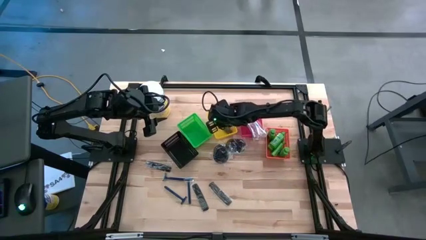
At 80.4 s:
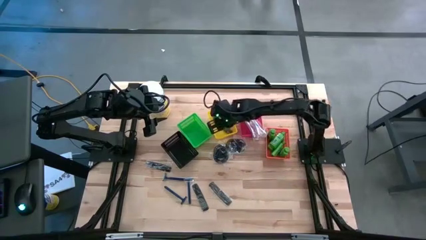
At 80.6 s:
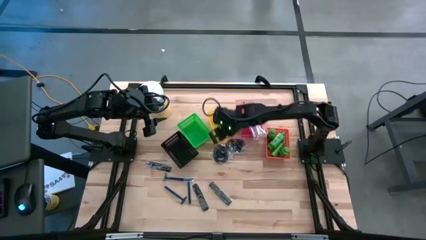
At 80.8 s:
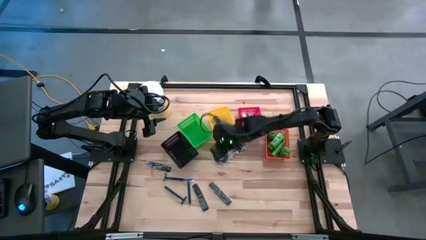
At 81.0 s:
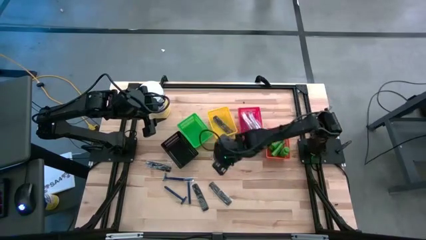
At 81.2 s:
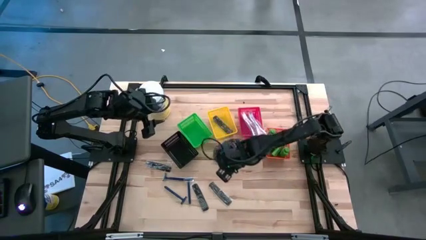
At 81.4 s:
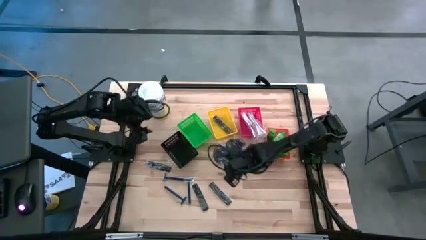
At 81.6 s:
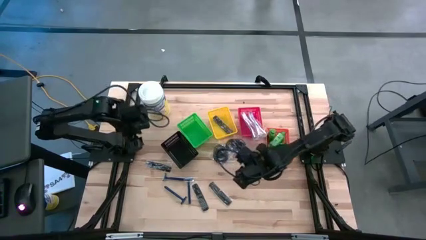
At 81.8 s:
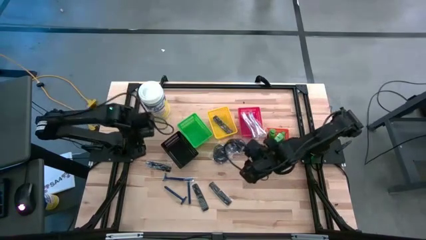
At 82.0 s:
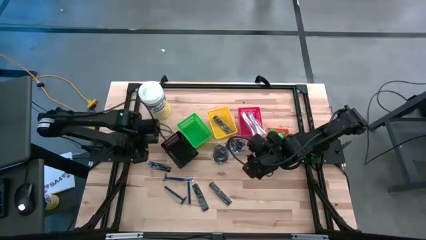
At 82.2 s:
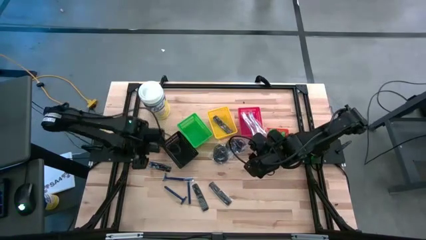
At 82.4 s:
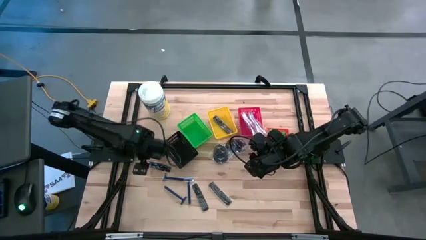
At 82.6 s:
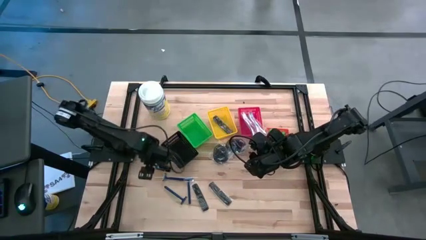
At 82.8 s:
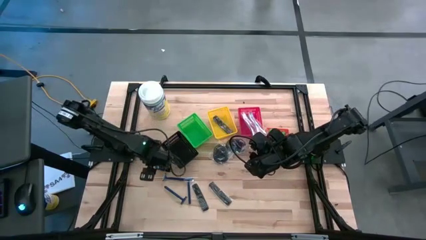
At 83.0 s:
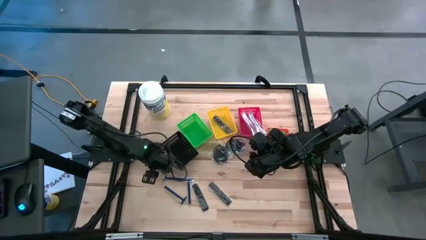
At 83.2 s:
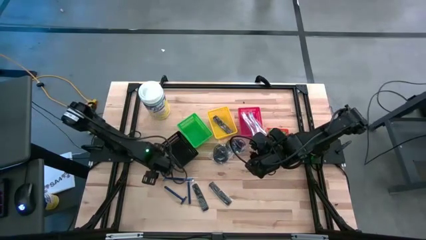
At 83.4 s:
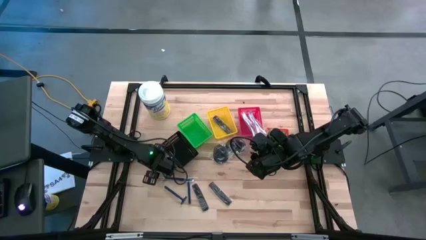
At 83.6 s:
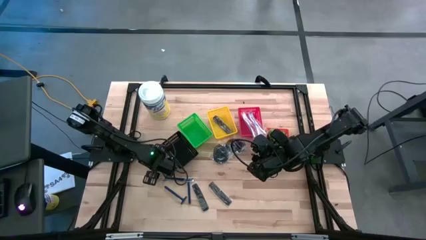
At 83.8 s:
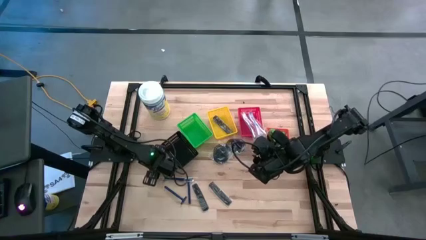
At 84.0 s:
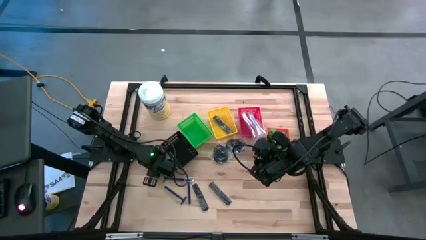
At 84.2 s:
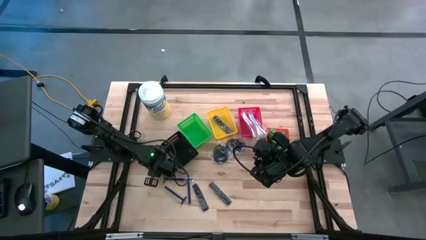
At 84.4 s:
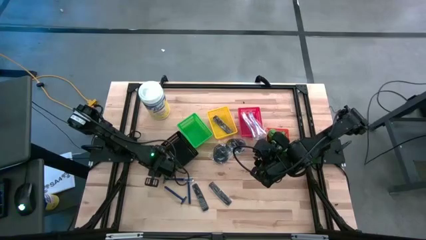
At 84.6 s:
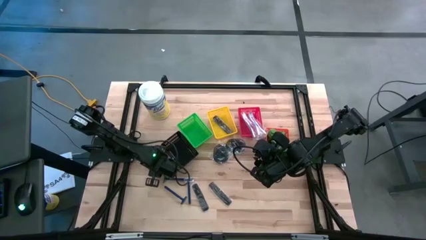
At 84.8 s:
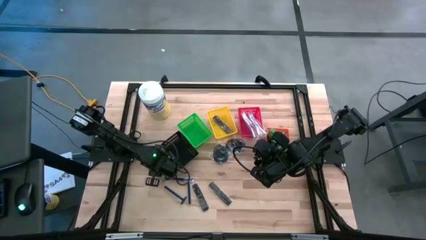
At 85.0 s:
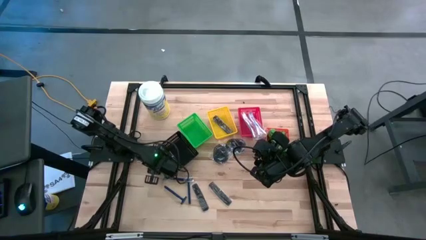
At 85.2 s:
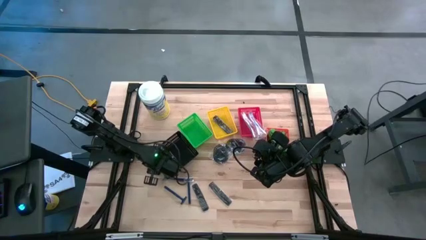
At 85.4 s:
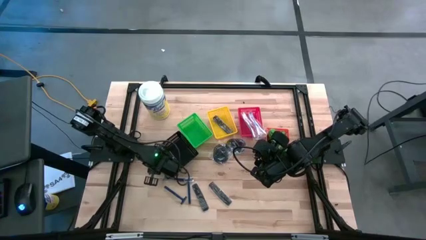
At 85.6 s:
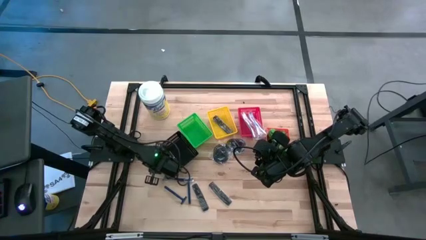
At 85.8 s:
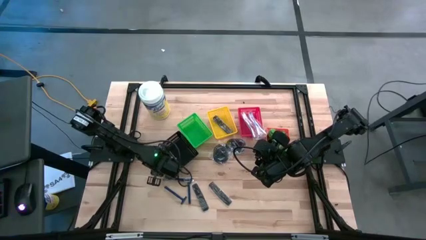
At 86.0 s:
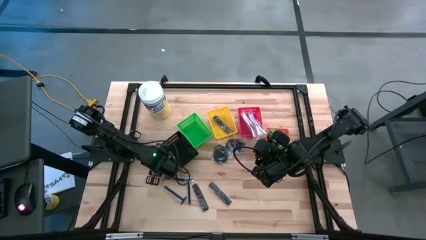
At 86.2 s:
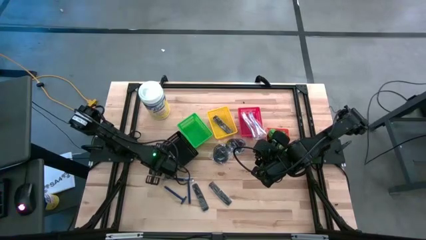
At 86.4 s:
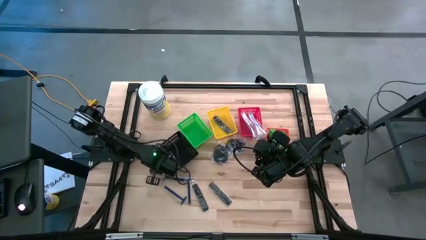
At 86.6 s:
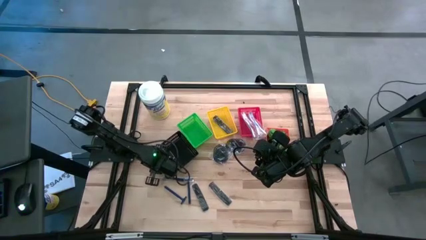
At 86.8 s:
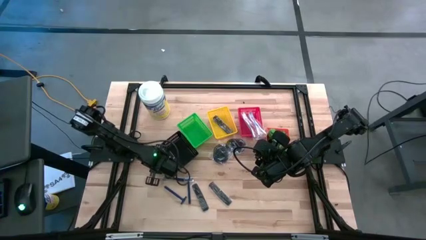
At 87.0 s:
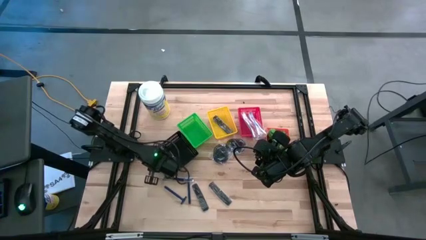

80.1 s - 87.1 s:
Task: Pick & Place Travel size toiletries
Put the black hair comb into the yellow bin

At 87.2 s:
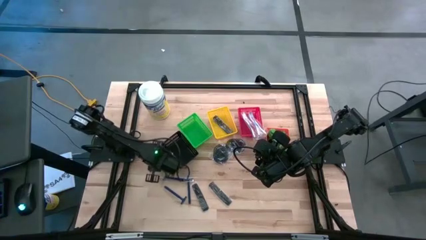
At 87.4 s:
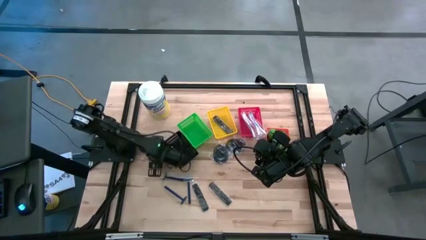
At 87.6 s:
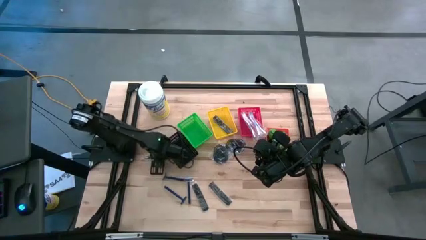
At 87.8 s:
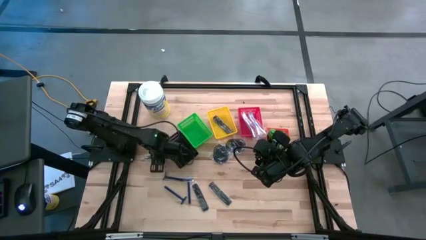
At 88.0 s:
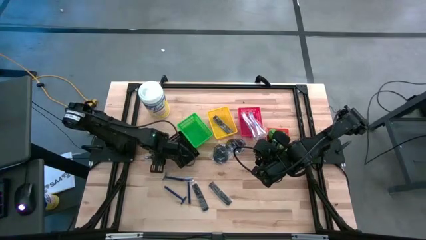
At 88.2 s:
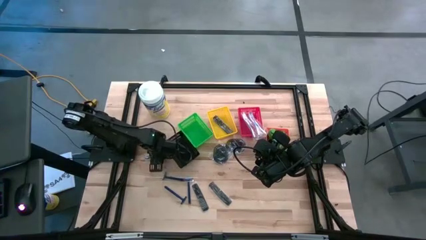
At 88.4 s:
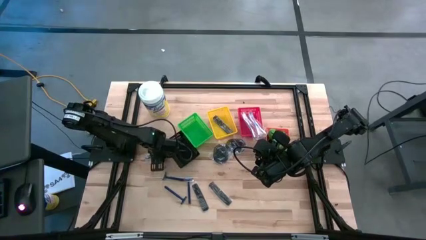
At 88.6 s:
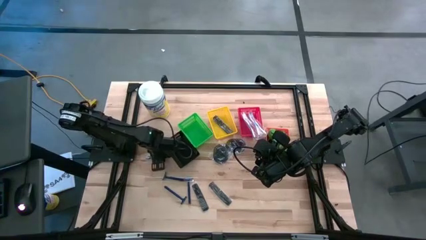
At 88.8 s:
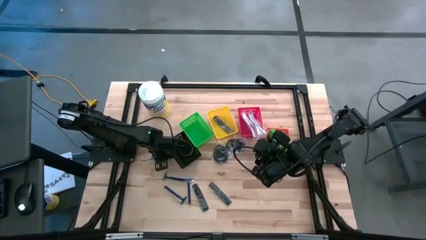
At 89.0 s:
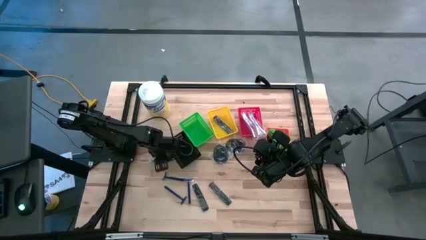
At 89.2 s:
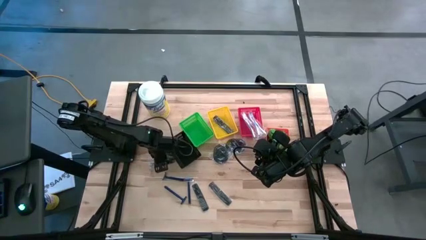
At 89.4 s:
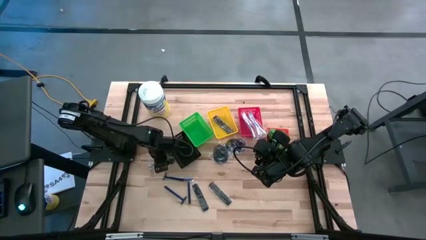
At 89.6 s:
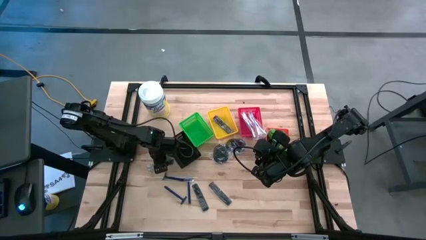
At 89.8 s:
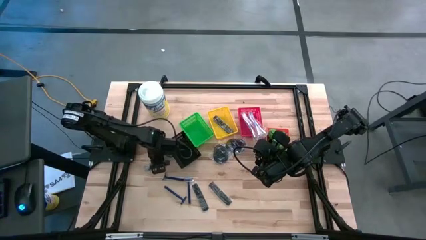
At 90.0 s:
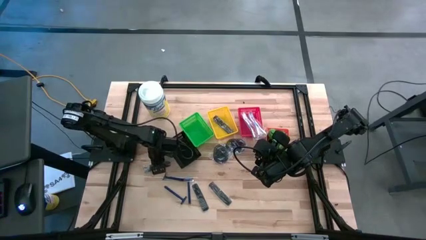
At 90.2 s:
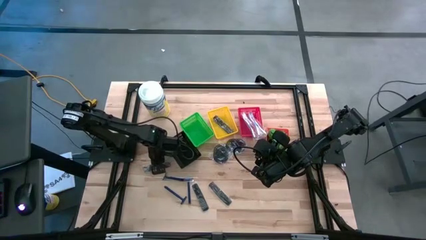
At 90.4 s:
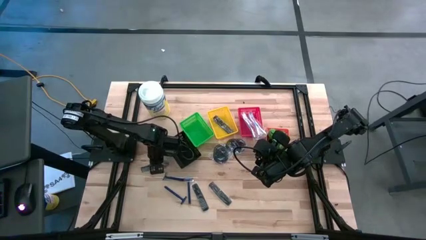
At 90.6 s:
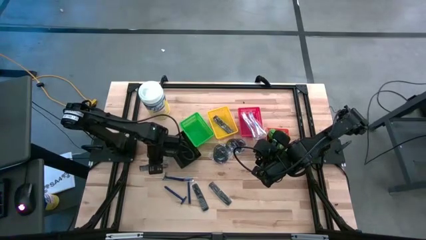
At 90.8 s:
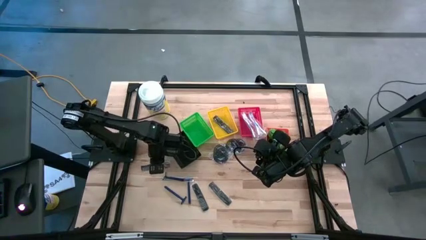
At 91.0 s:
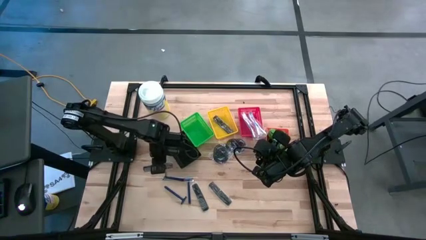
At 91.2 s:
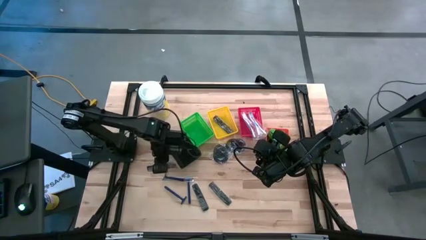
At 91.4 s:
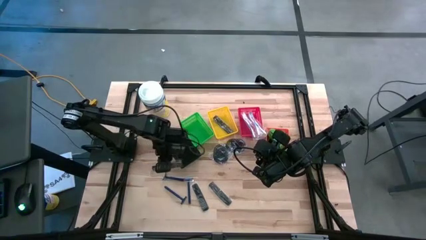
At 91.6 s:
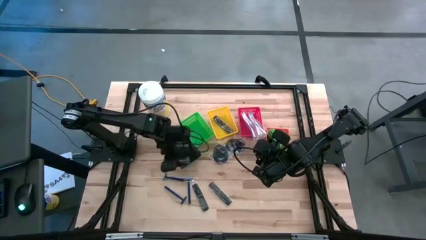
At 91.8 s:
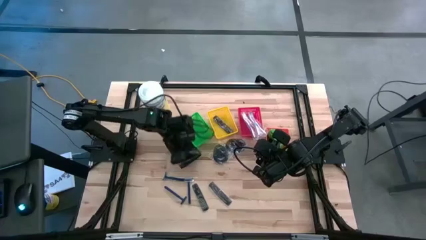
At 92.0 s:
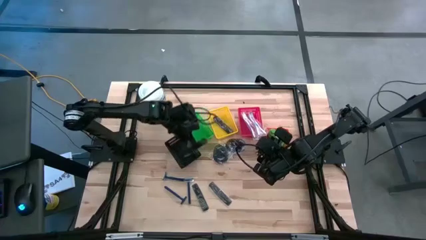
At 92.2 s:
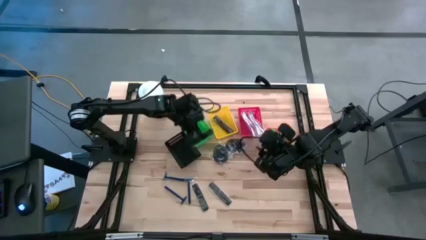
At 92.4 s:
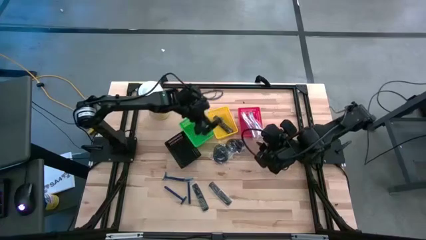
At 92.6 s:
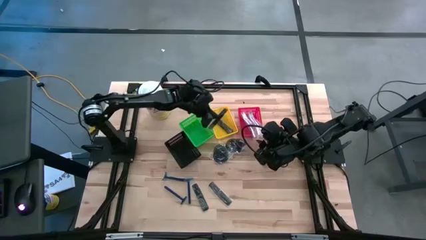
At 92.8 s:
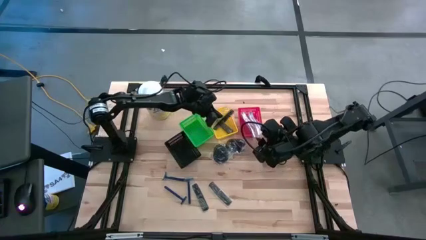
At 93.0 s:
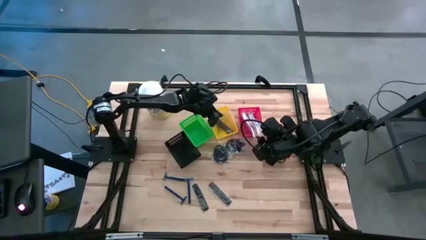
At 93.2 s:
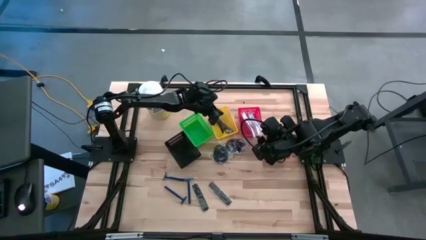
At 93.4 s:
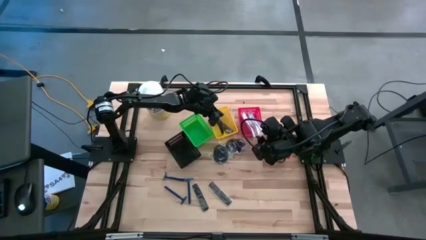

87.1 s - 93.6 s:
Put the black hair comb into the yellow bin

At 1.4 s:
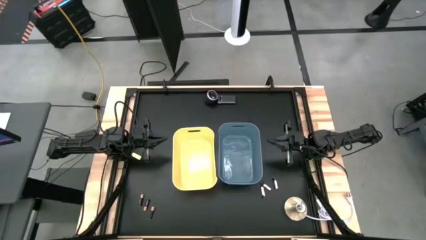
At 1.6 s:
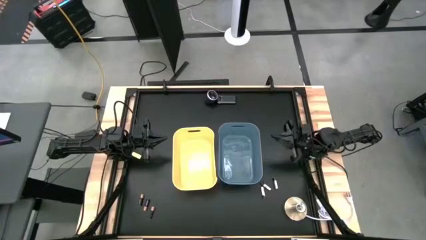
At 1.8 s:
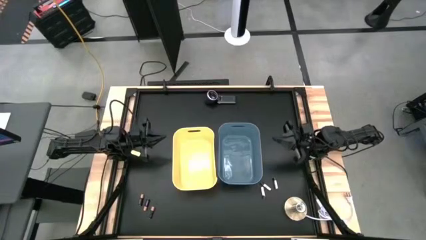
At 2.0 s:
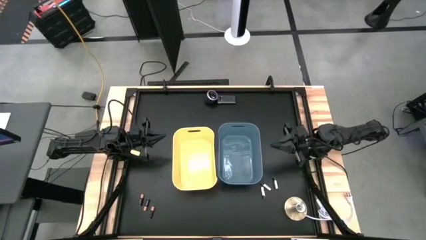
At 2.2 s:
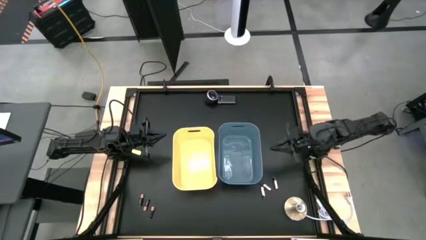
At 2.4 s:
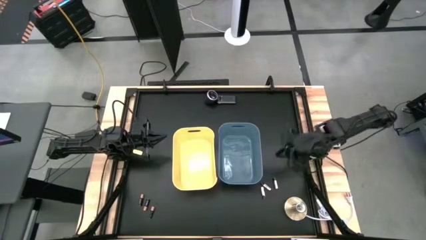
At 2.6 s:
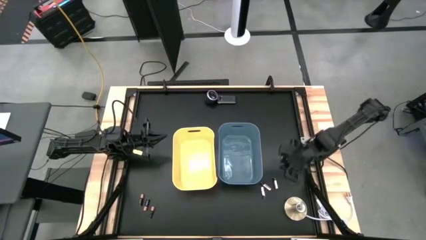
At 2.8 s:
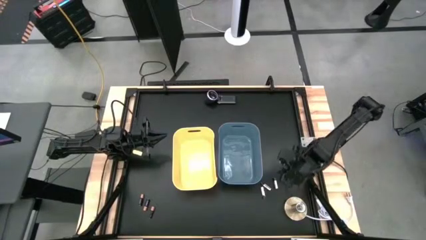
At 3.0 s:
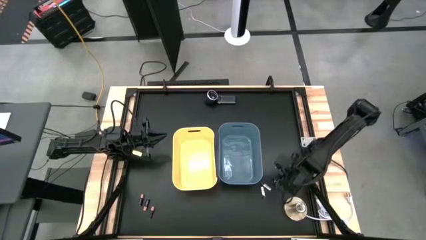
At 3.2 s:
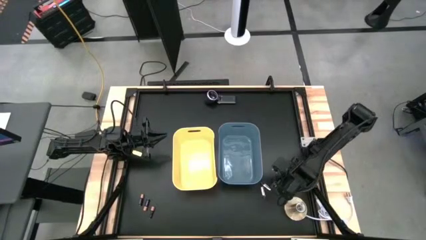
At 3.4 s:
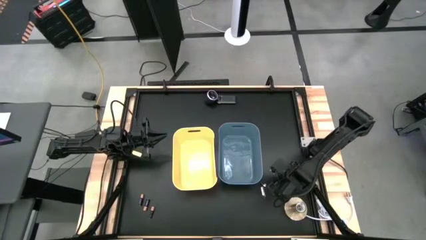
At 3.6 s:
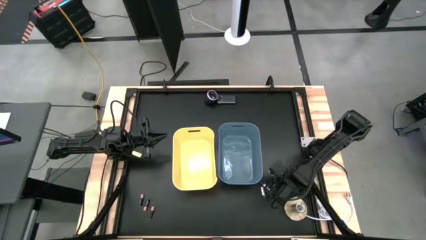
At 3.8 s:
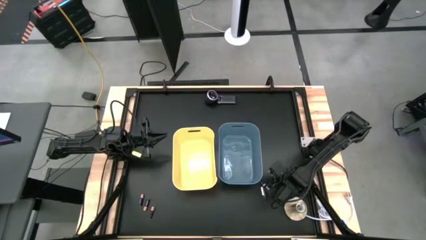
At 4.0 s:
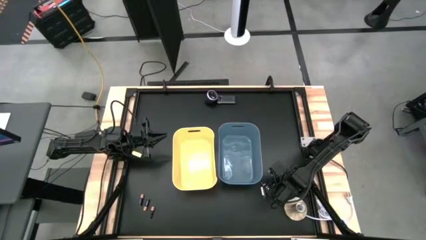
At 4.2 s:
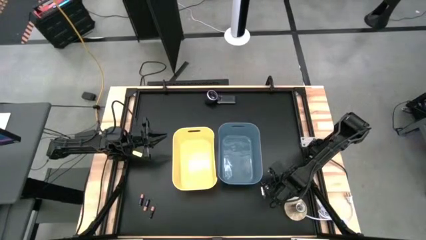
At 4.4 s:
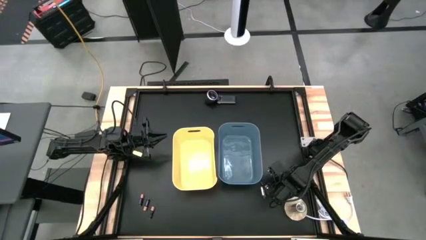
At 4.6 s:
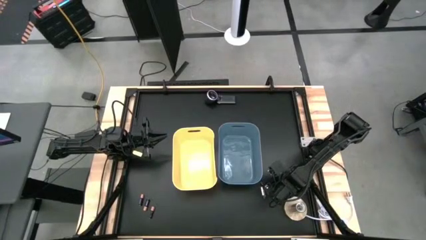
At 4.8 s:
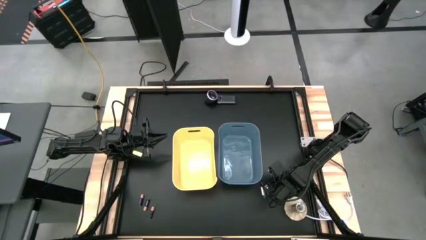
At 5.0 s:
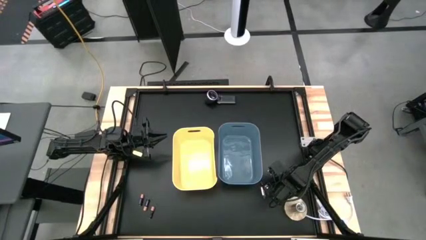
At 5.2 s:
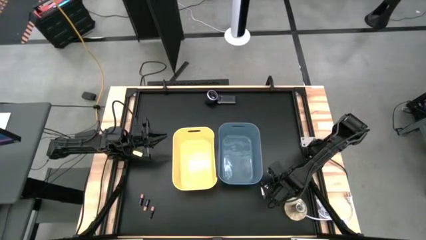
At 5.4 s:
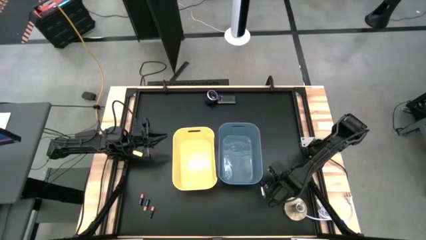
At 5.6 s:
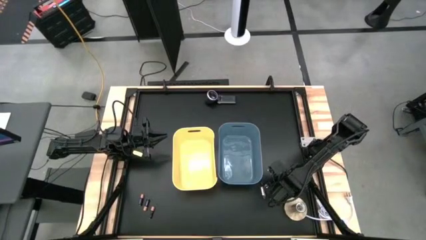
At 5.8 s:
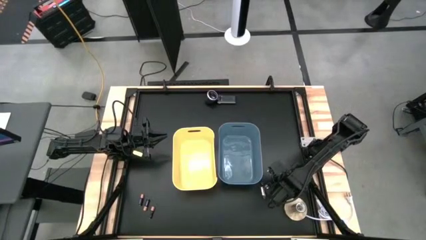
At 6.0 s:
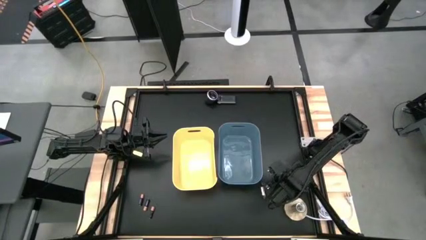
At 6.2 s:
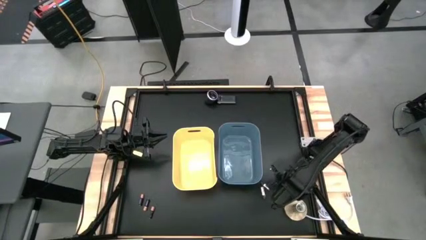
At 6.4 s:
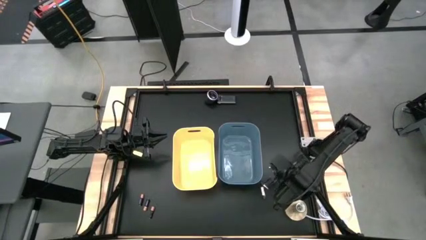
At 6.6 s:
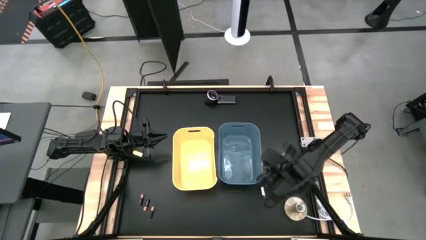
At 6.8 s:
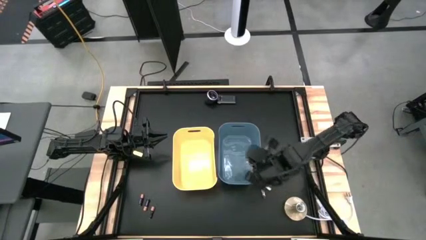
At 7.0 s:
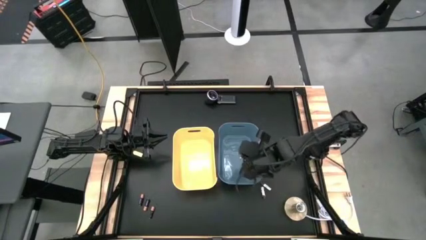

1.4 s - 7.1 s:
Task: Sort batteries
Put the right silver battery into the blue bin
